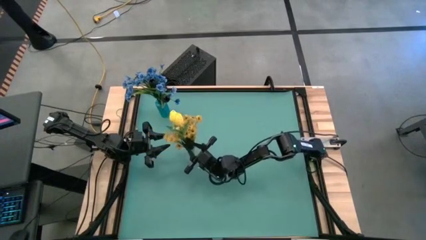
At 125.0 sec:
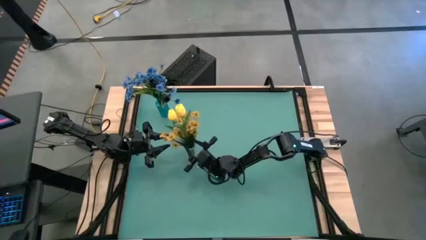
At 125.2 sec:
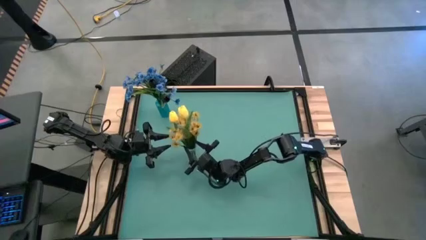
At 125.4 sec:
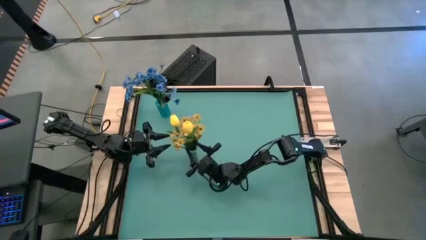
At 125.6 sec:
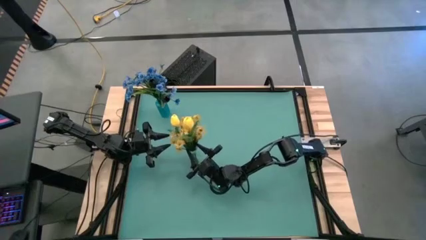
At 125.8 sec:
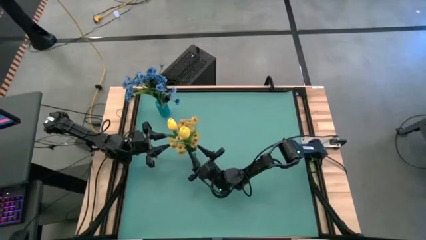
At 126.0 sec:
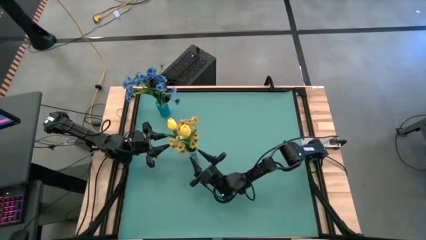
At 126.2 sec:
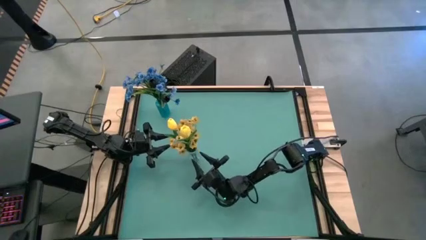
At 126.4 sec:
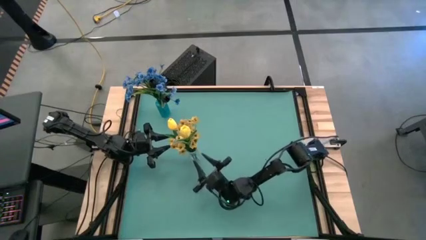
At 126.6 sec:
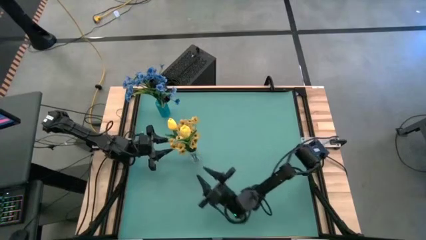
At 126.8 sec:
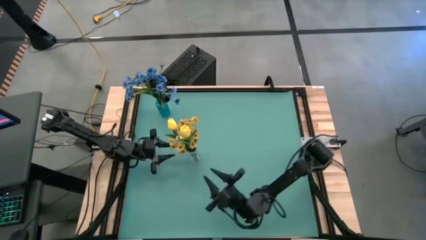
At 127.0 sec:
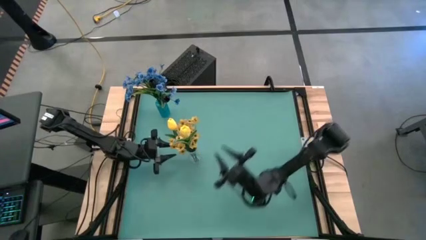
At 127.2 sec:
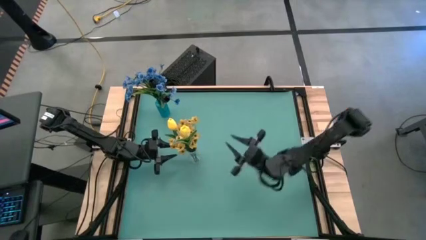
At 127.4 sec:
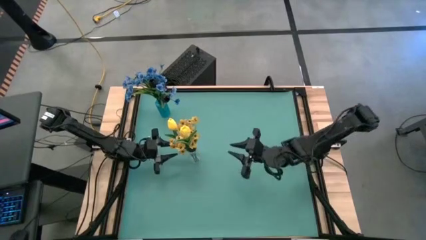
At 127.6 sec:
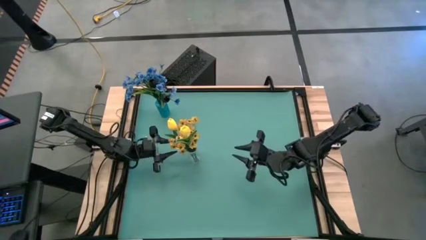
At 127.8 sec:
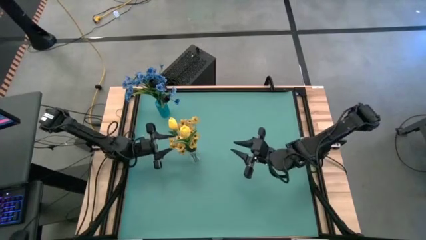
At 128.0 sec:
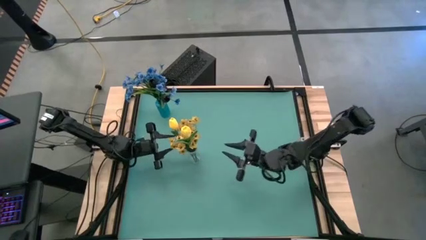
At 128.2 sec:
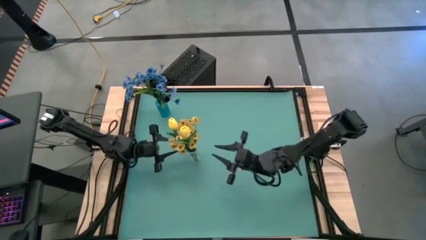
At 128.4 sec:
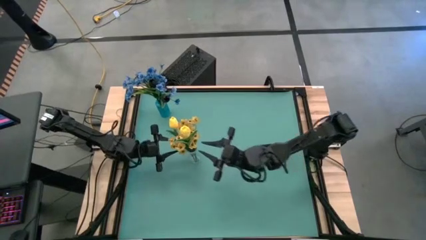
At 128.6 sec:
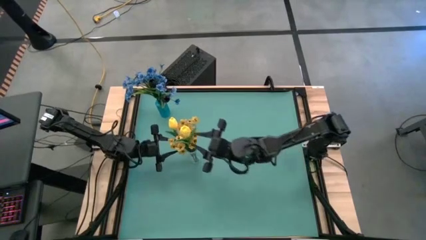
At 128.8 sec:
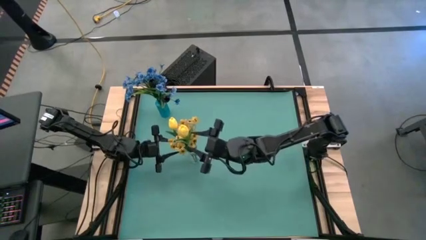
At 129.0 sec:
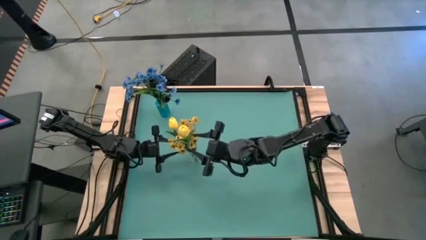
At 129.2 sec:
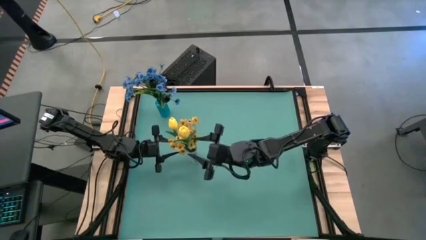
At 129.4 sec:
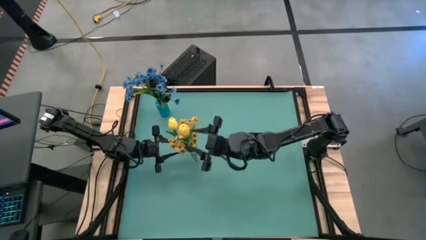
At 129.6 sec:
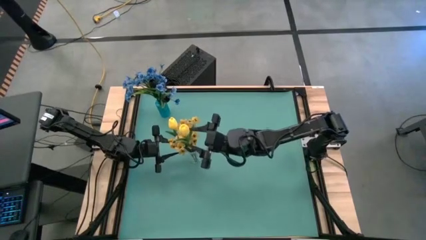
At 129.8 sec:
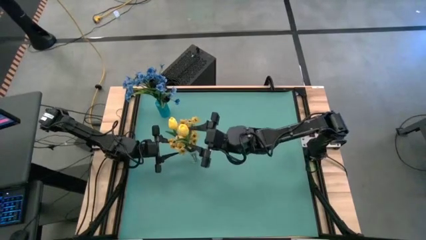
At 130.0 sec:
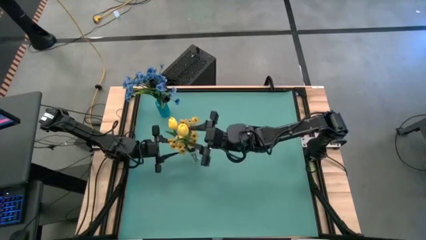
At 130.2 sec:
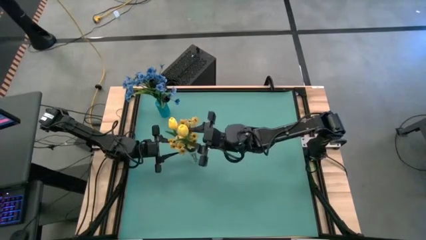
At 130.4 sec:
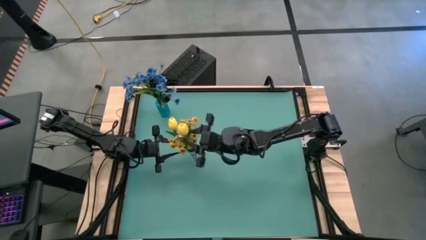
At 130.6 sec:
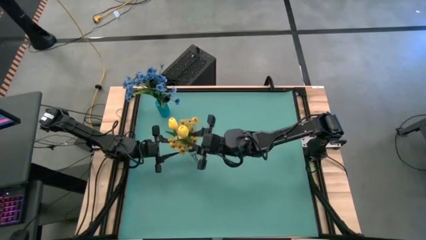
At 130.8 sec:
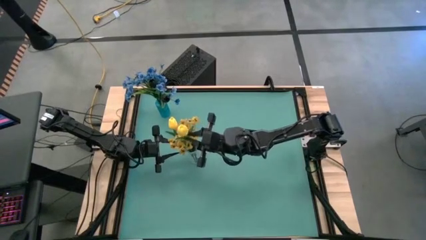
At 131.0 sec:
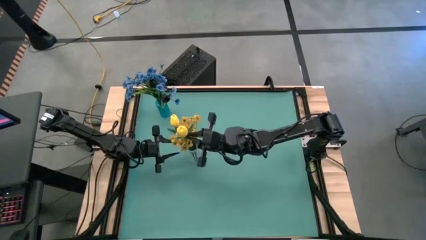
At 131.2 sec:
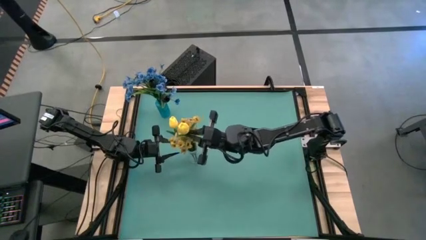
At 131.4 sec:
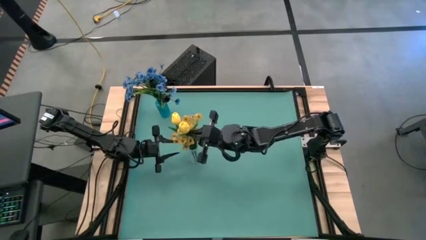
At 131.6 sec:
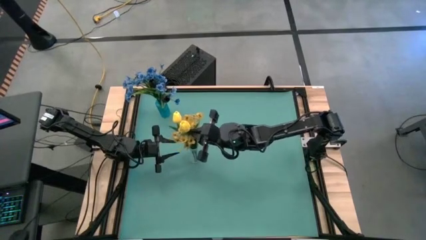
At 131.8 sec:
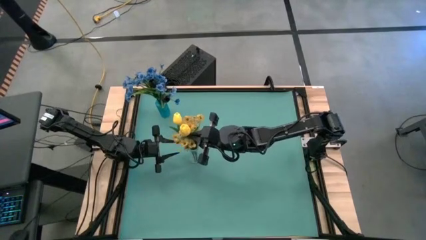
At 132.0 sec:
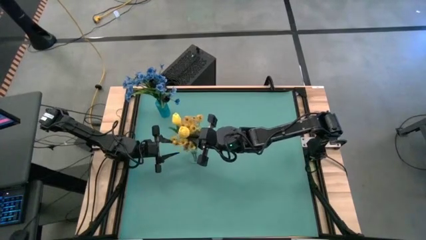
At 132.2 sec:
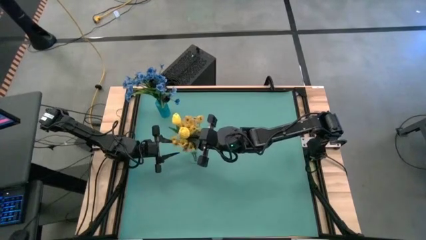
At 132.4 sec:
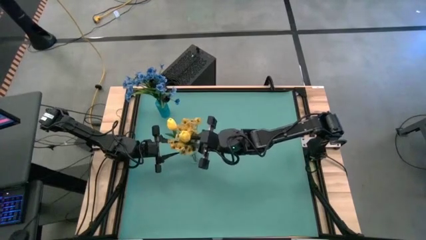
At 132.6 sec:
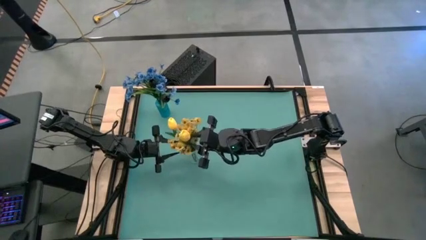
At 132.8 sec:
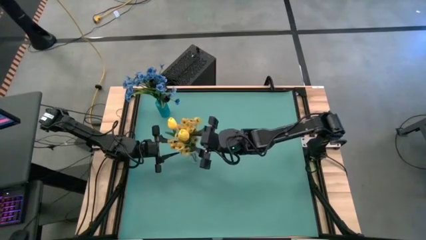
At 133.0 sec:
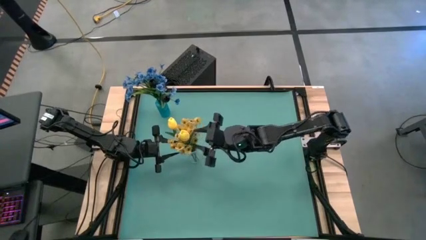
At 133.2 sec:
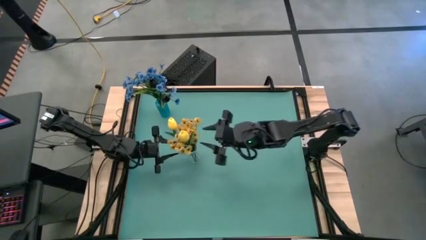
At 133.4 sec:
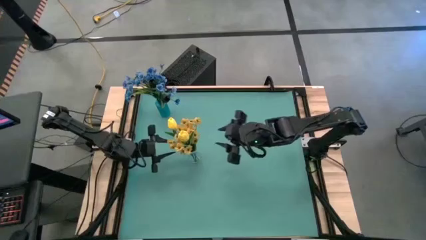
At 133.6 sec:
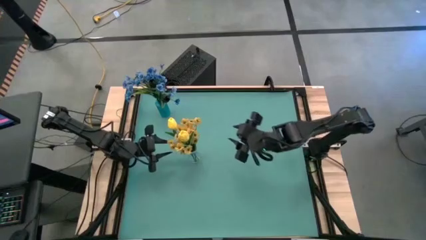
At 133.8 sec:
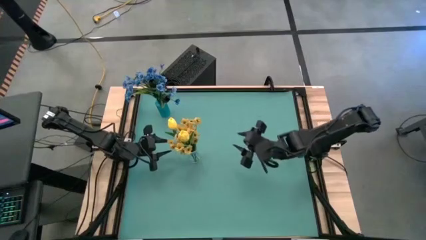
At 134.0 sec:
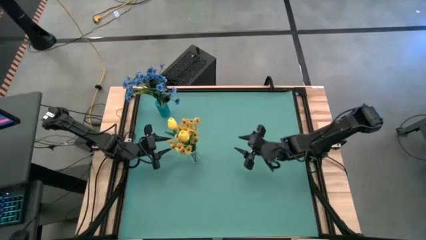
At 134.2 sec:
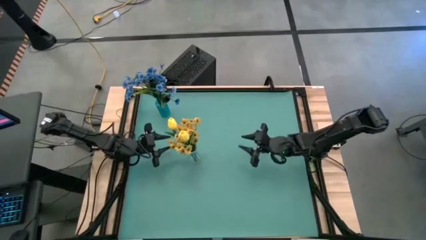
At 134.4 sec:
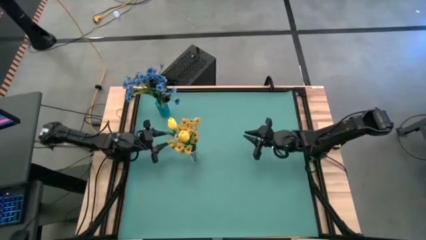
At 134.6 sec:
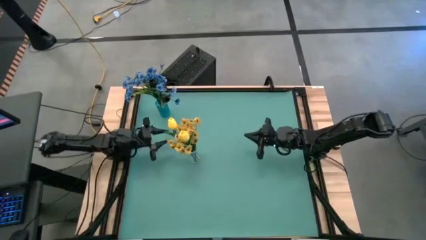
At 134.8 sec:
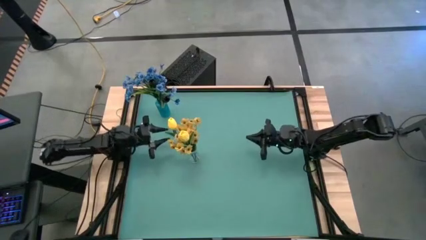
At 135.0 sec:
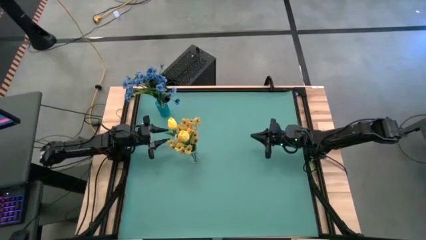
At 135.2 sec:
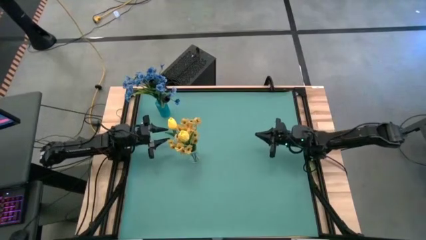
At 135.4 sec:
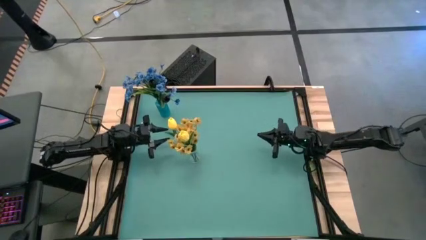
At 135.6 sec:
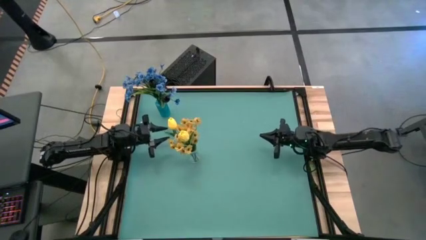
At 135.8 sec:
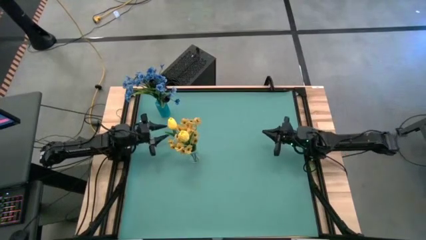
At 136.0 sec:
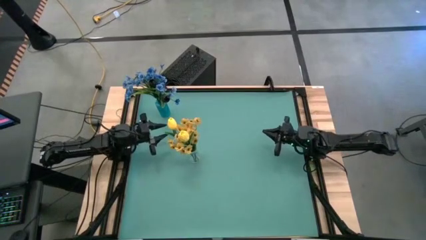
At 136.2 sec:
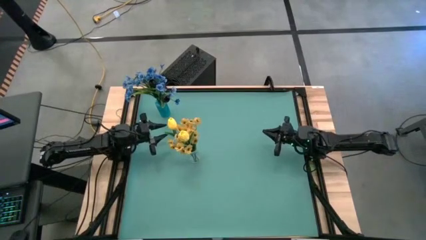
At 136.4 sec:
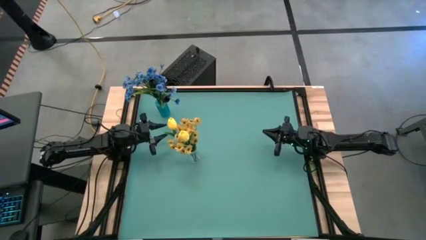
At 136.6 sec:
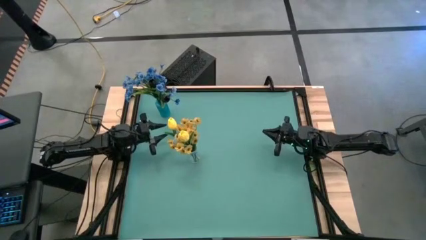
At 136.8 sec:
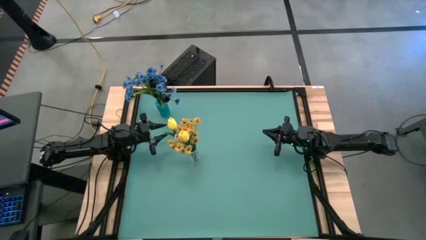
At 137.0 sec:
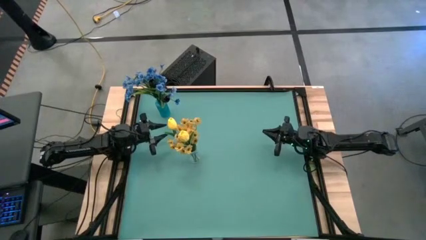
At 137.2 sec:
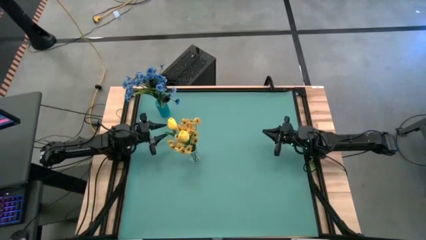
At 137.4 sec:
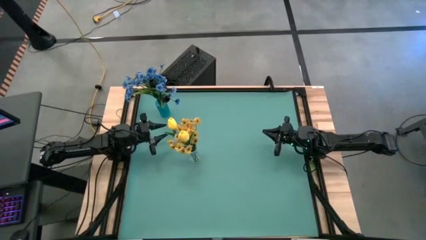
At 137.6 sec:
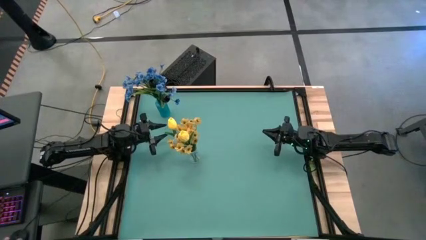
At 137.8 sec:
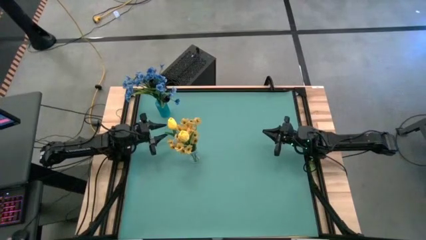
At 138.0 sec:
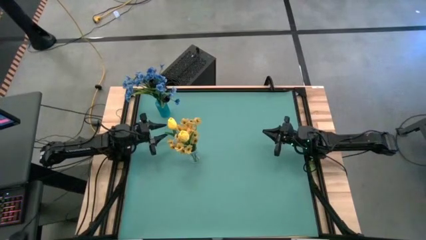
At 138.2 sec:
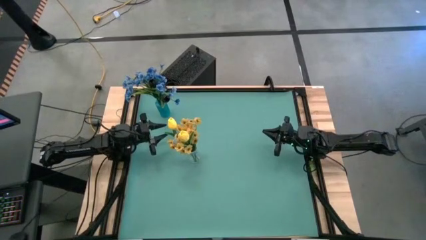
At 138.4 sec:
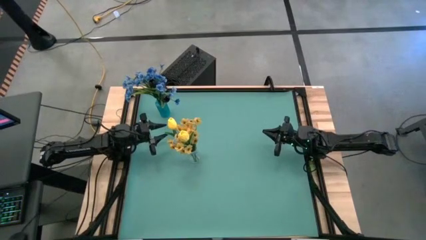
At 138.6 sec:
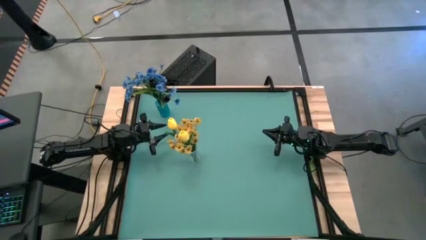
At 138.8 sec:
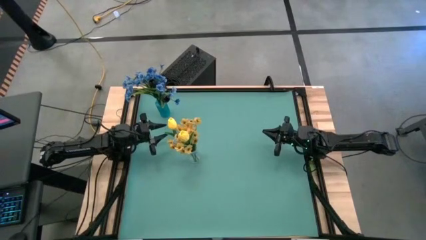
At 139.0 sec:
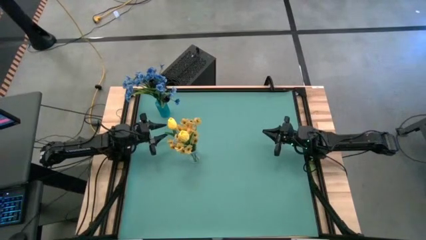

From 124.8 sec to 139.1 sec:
Task: Sort flowers into vase by color
Return to Home Position
